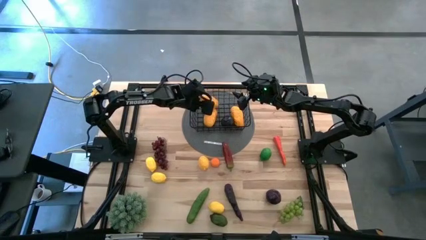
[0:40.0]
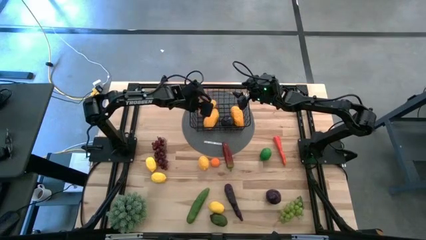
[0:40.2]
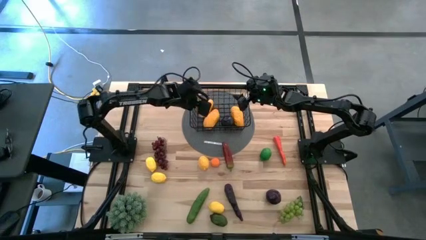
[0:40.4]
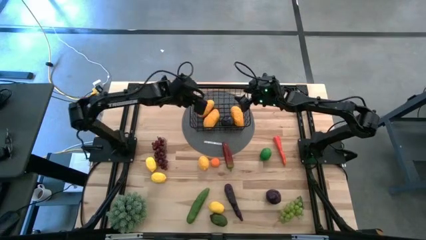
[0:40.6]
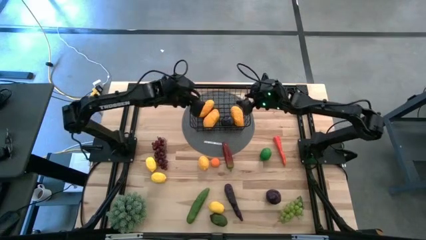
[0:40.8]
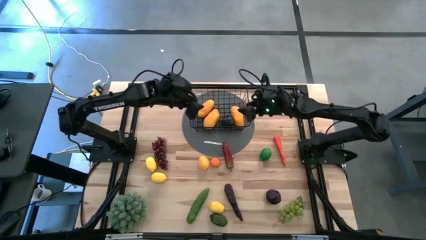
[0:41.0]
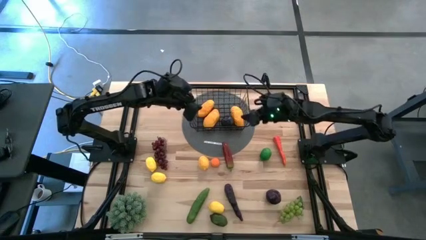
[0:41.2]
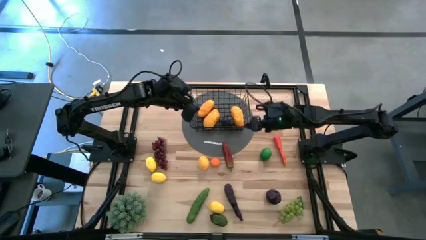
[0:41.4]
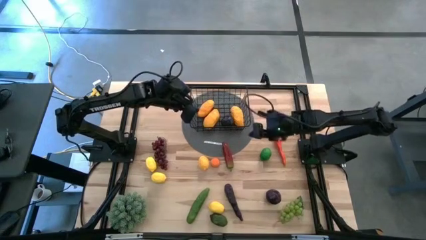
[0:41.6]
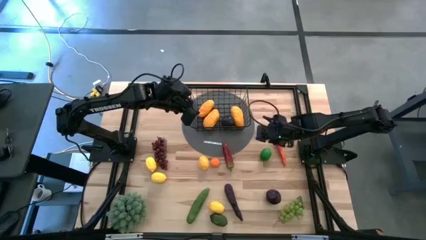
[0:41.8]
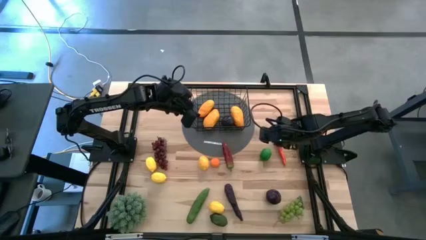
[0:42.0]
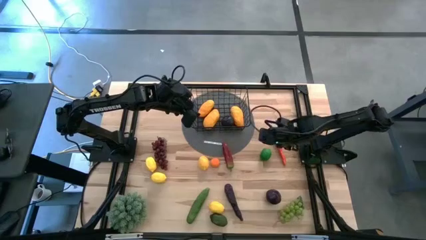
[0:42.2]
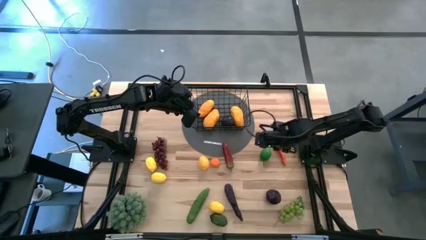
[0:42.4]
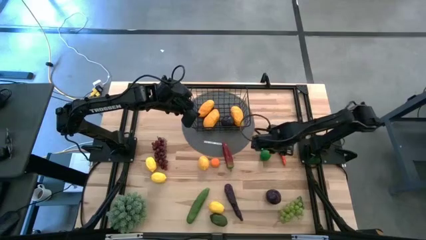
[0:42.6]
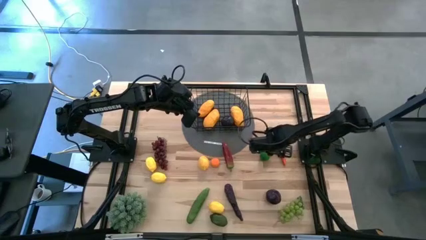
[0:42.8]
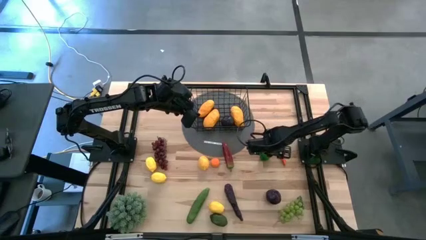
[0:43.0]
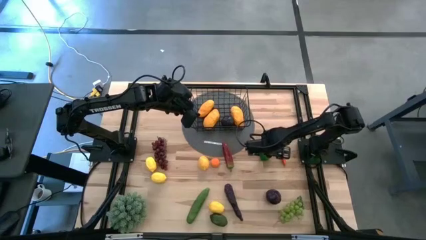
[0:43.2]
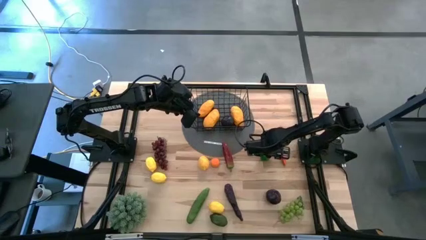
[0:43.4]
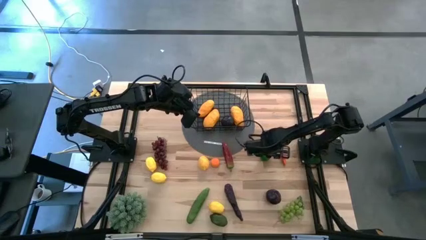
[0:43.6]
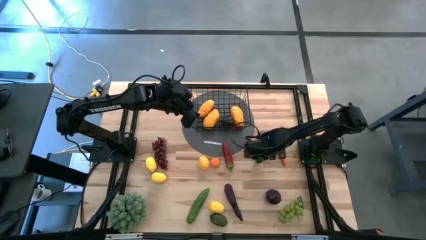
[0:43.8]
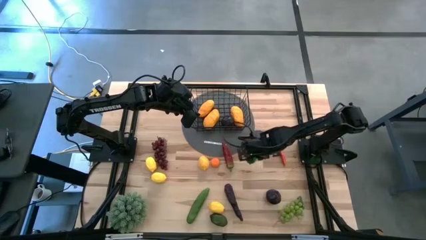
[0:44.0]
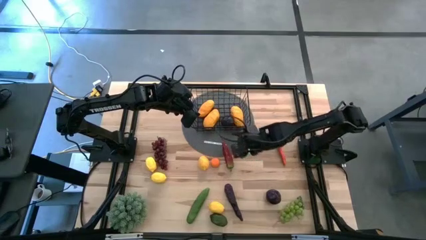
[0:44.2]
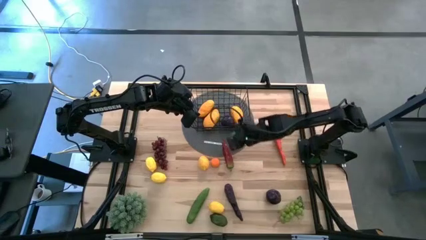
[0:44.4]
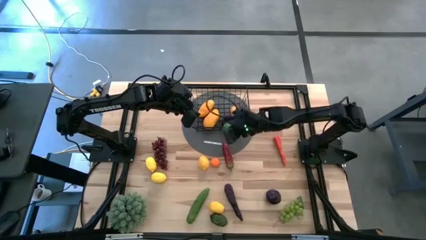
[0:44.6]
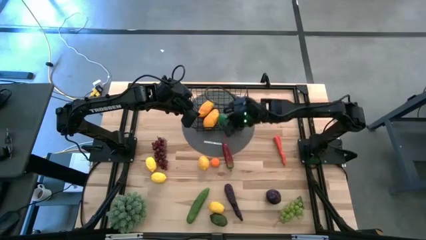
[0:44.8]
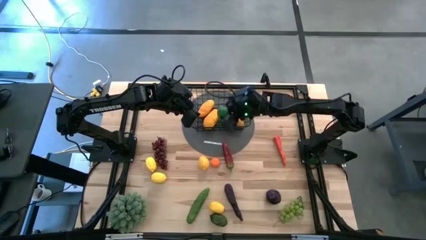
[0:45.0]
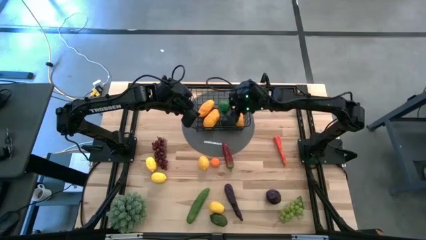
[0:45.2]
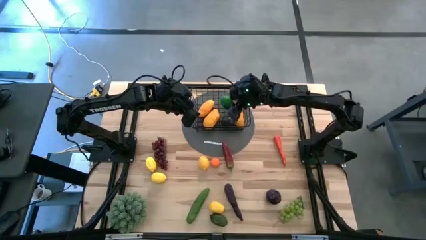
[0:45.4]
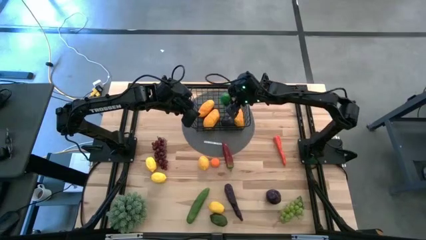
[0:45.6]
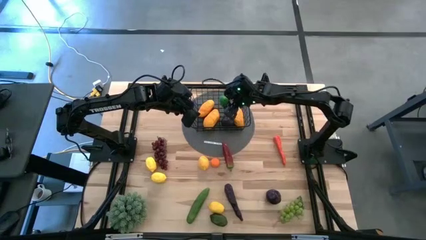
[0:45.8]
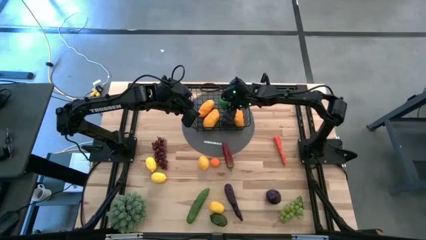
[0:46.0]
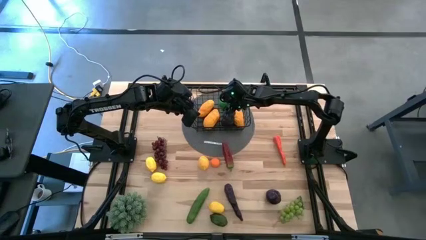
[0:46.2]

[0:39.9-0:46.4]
Task: Build produce basket
Put the top green lime into the black wire basket

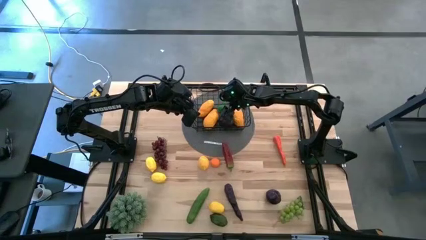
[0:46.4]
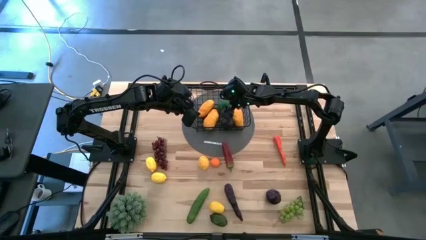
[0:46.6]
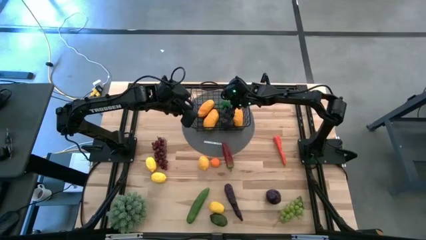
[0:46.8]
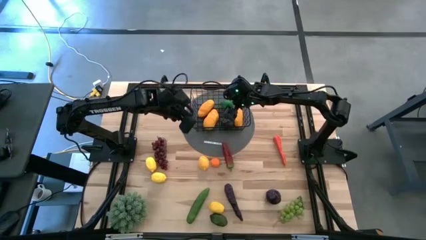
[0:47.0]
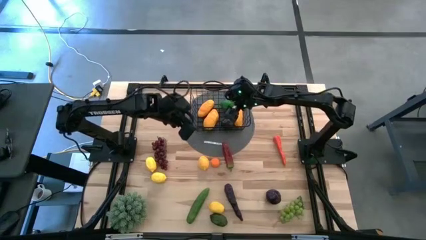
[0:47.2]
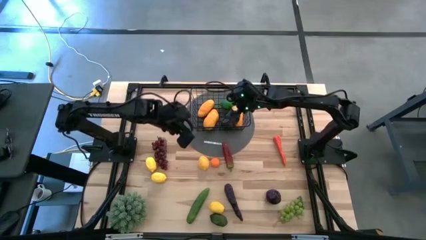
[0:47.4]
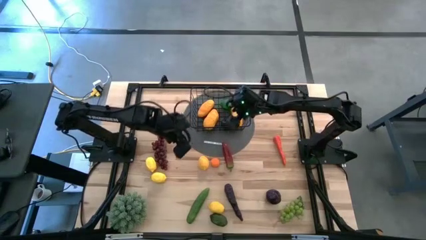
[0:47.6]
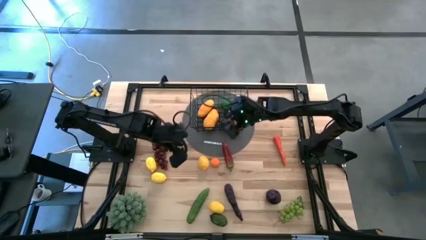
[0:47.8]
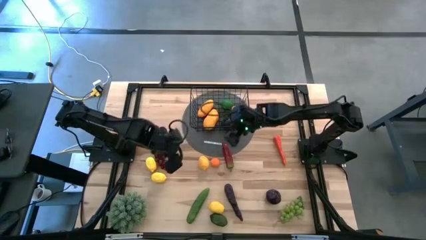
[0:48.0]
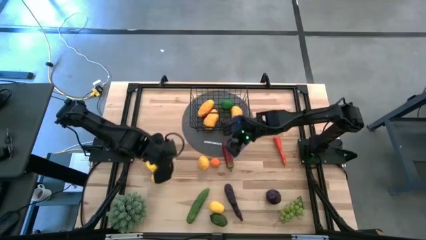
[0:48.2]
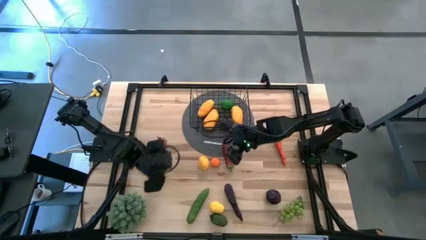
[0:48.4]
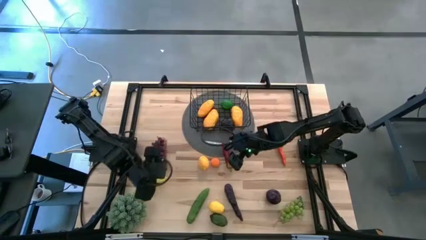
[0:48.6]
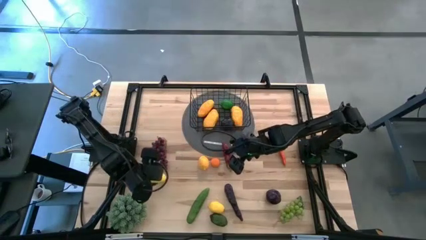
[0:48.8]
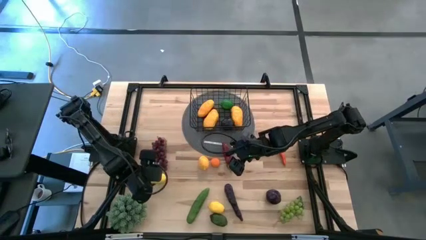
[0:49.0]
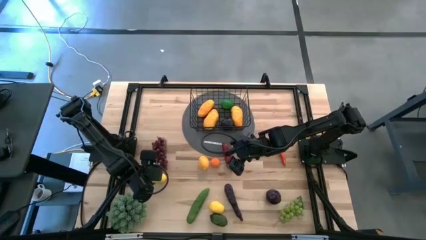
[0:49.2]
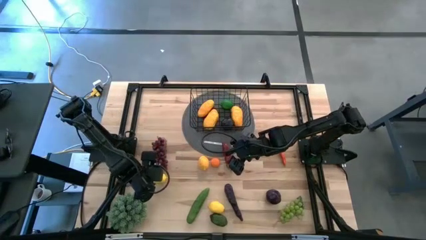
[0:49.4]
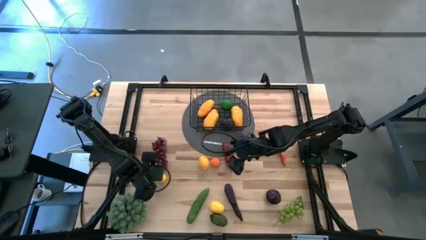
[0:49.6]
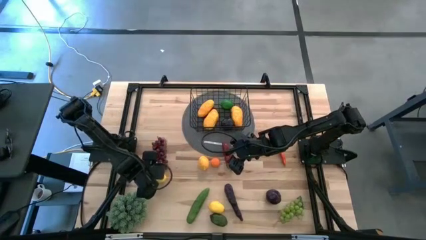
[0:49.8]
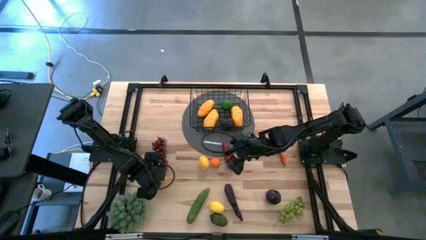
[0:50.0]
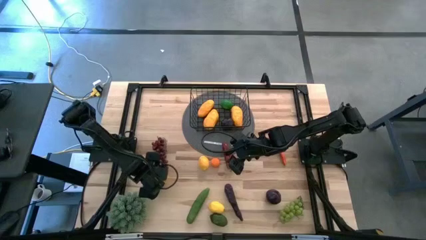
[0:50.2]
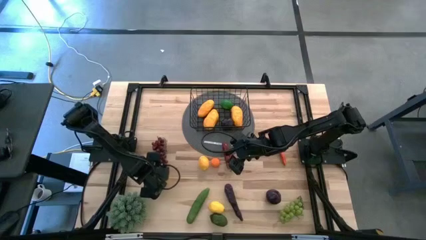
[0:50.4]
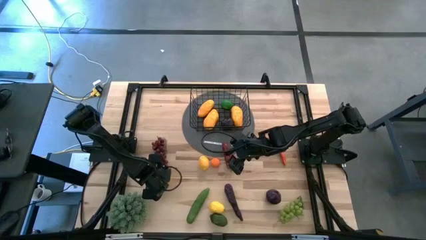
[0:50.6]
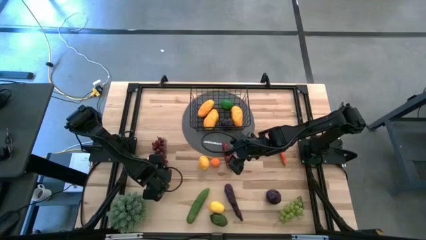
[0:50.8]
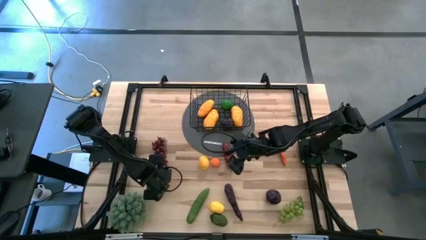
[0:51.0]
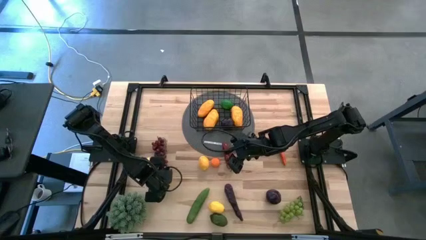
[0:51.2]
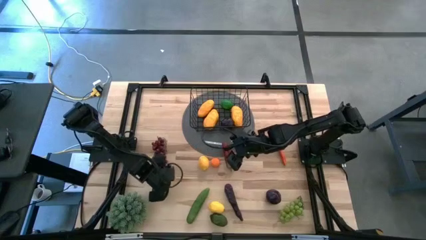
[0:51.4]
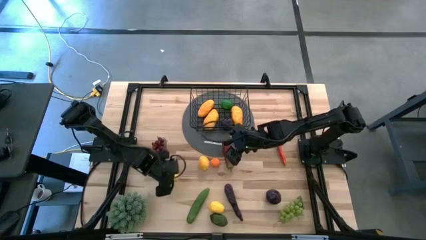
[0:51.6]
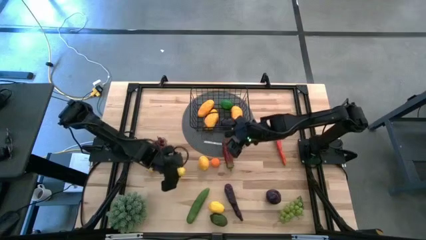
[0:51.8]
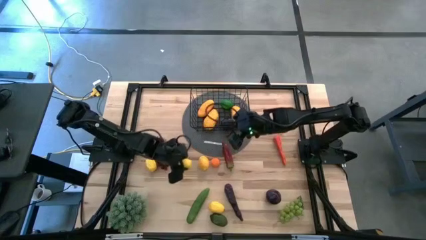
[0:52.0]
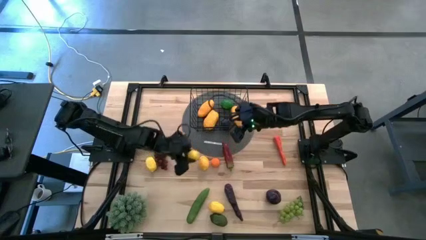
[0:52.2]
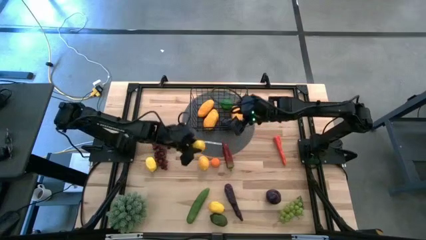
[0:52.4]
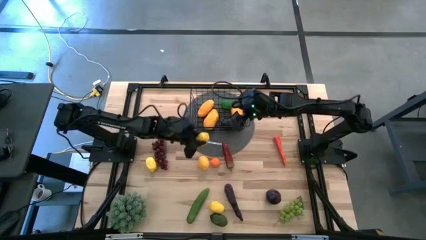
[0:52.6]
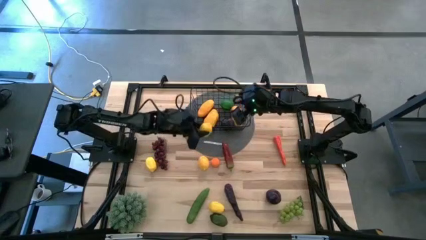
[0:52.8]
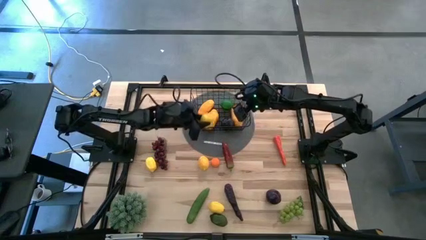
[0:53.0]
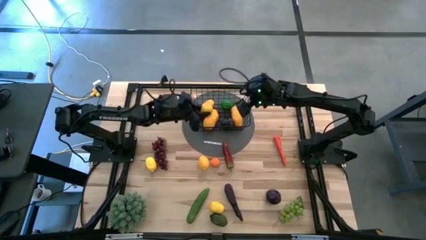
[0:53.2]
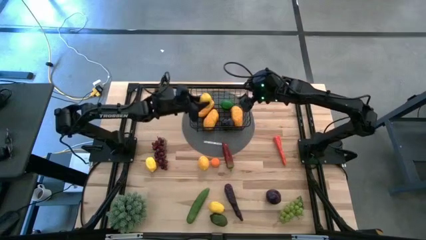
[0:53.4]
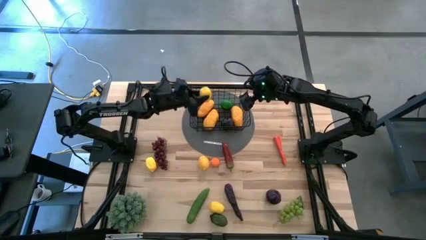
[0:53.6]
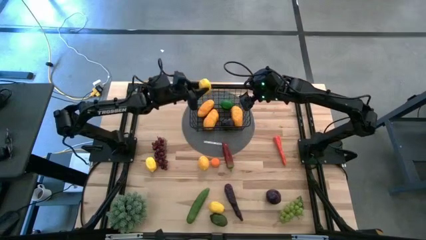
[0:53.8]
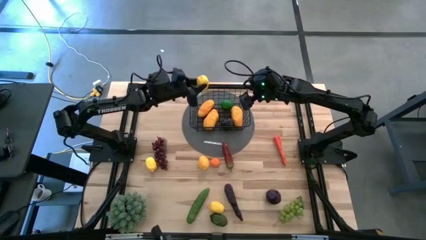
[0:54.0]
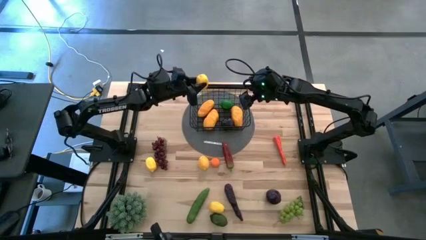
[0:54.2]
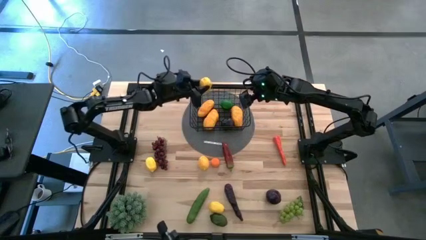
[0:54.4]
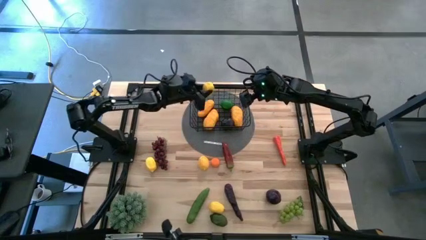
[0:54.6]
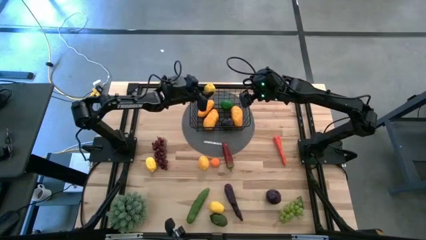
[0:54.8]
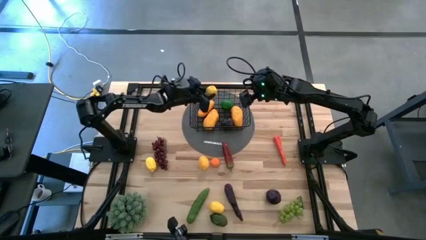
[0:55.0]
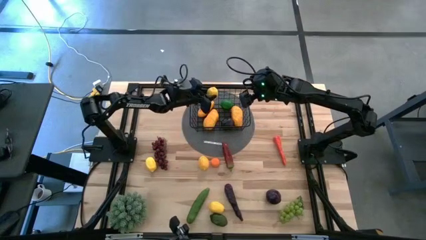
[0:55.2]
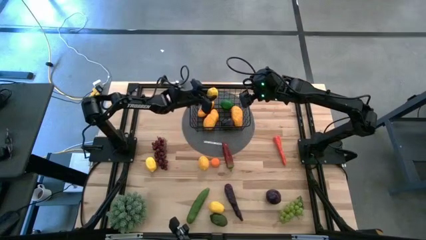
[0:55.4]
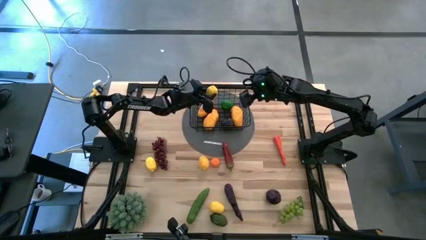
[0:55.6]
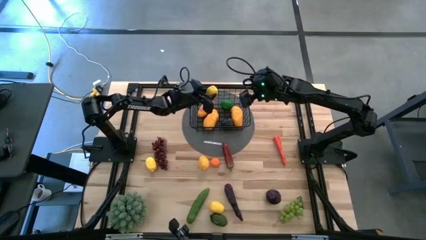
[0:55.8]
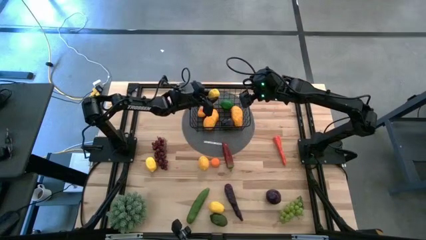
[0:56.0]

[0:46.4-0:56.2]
Put the yellow lemon into the black wire basket
